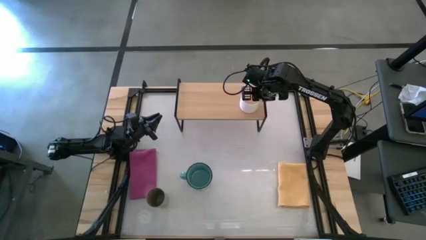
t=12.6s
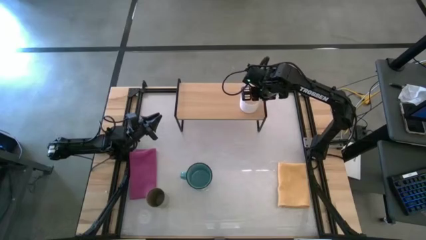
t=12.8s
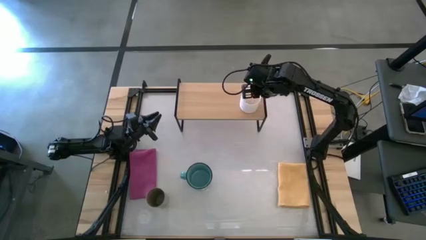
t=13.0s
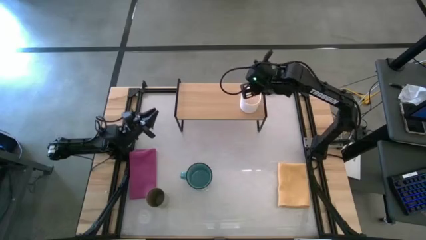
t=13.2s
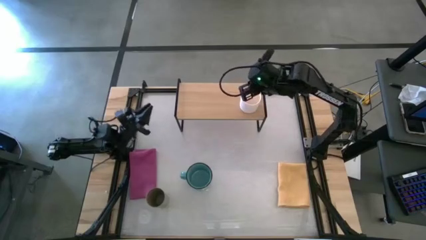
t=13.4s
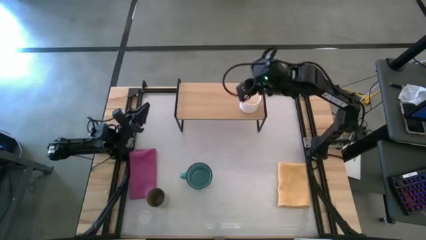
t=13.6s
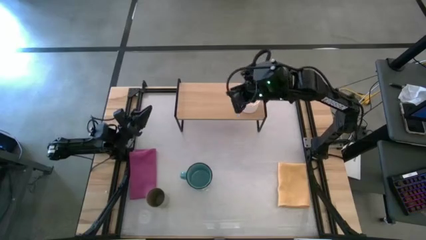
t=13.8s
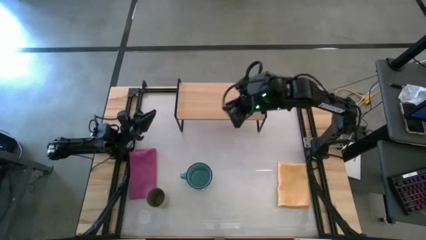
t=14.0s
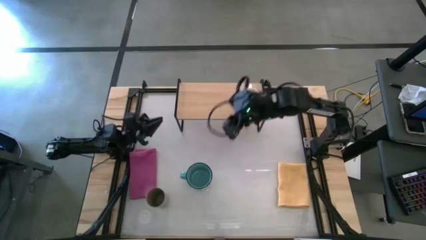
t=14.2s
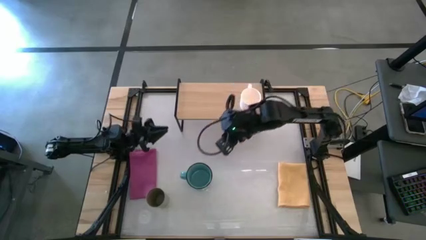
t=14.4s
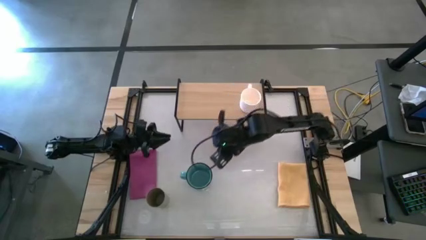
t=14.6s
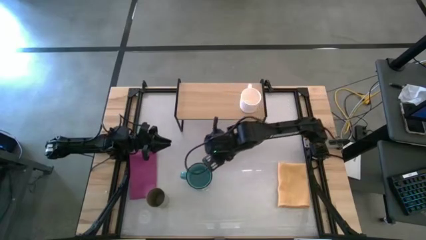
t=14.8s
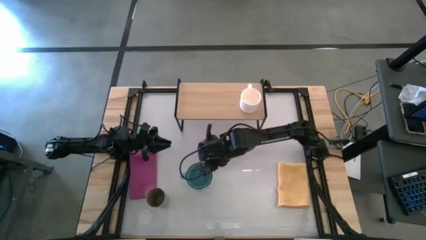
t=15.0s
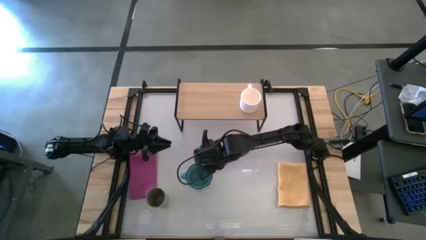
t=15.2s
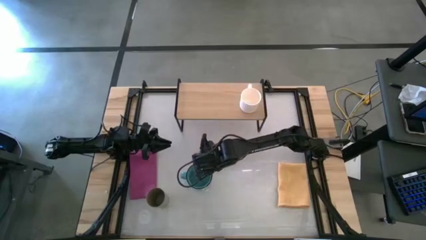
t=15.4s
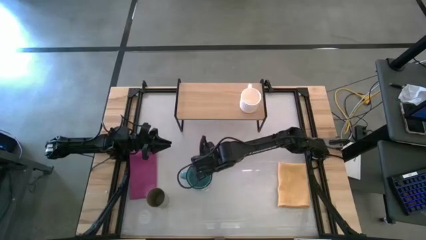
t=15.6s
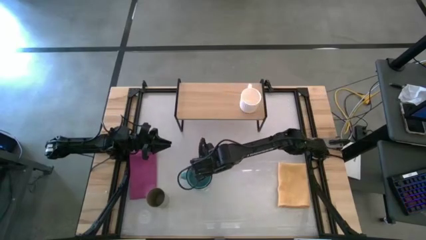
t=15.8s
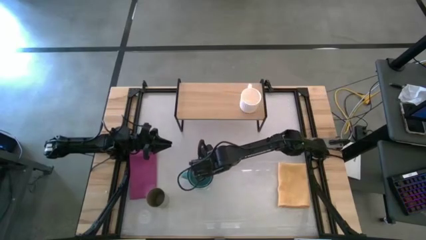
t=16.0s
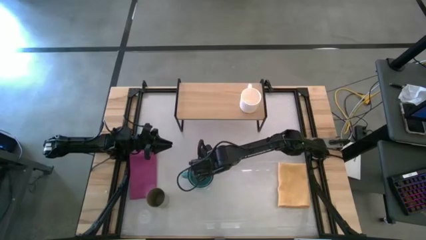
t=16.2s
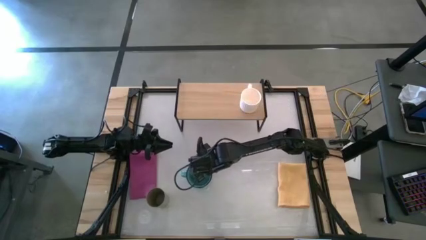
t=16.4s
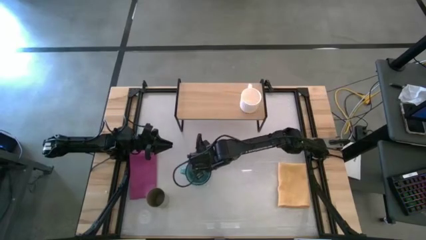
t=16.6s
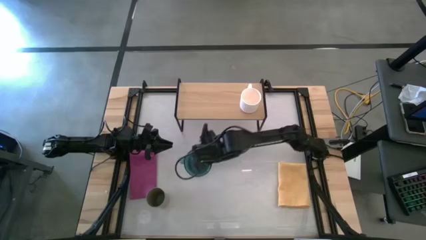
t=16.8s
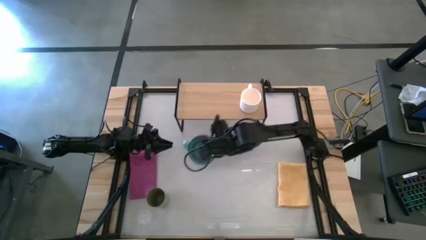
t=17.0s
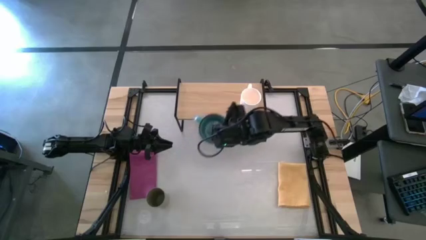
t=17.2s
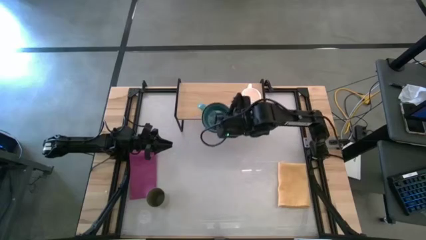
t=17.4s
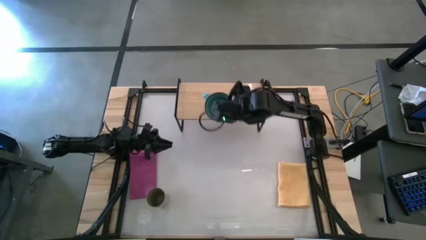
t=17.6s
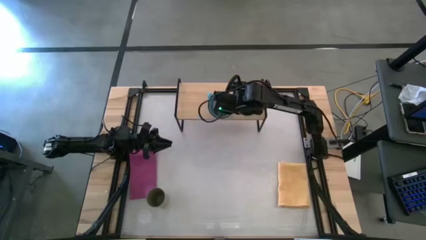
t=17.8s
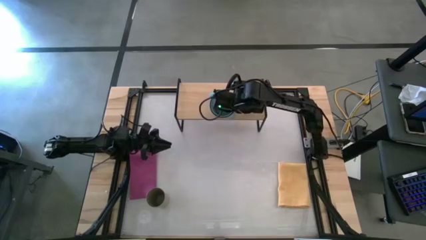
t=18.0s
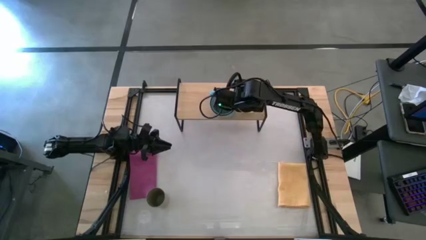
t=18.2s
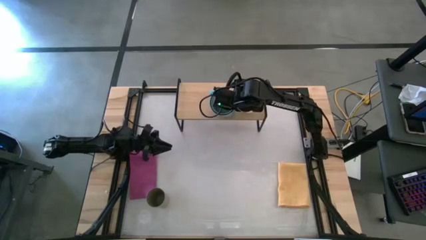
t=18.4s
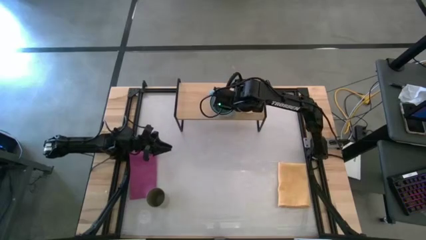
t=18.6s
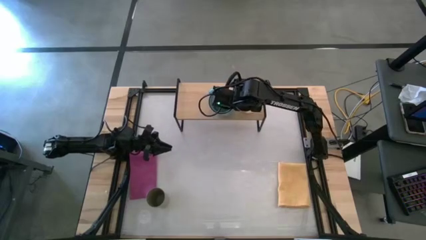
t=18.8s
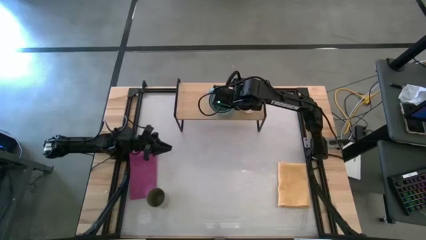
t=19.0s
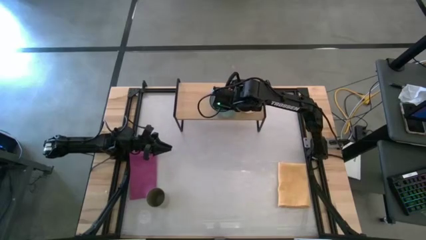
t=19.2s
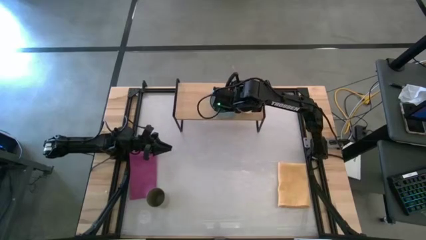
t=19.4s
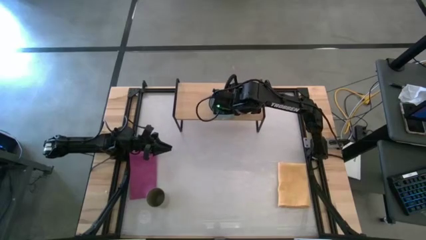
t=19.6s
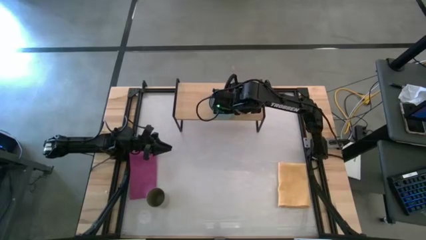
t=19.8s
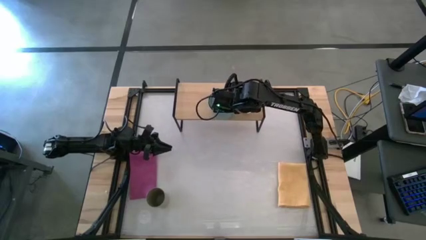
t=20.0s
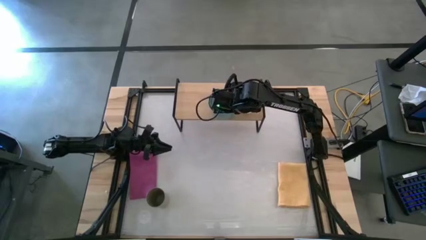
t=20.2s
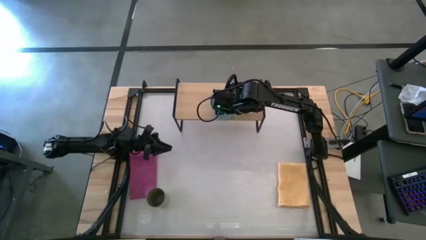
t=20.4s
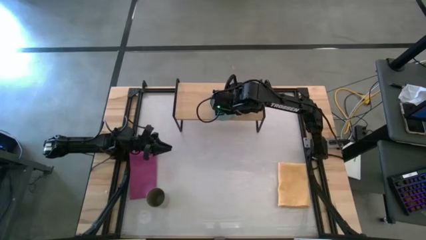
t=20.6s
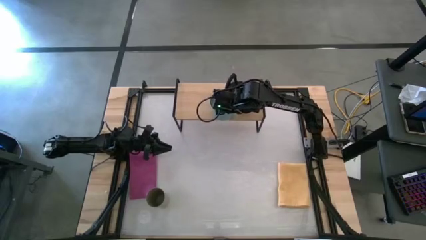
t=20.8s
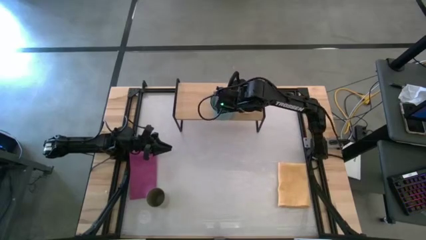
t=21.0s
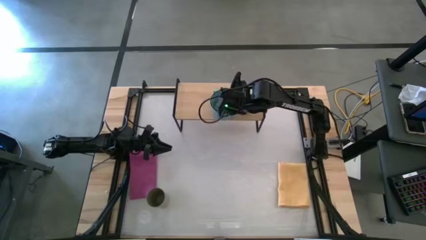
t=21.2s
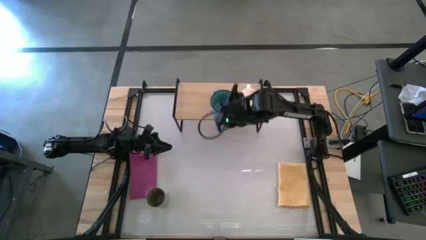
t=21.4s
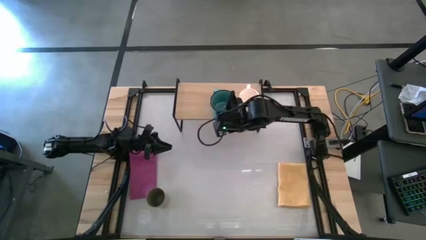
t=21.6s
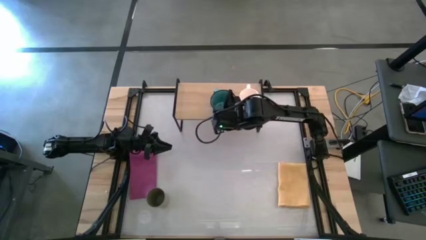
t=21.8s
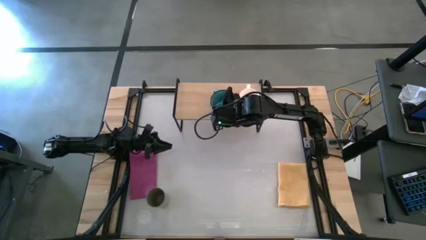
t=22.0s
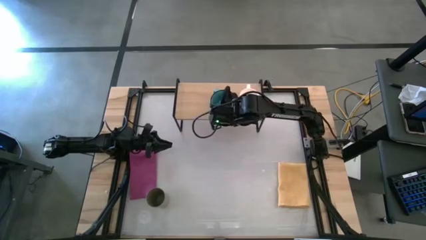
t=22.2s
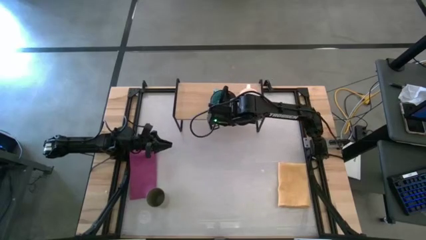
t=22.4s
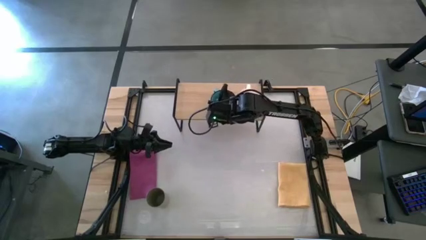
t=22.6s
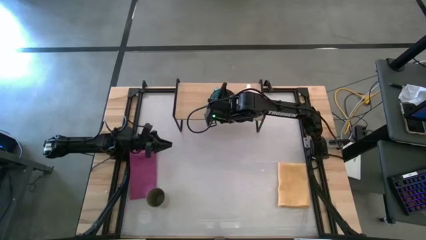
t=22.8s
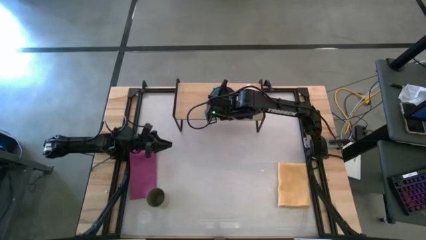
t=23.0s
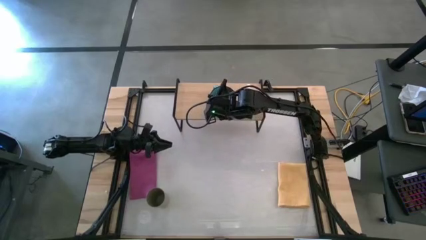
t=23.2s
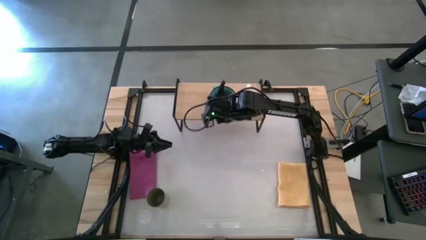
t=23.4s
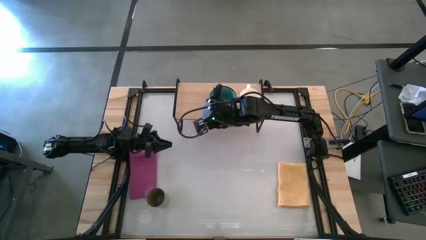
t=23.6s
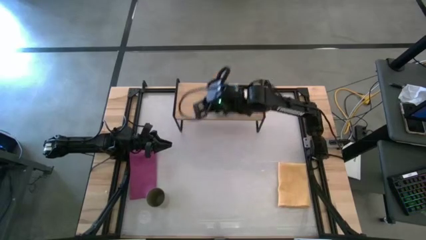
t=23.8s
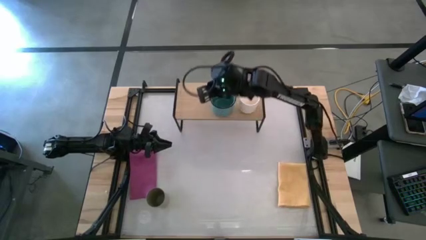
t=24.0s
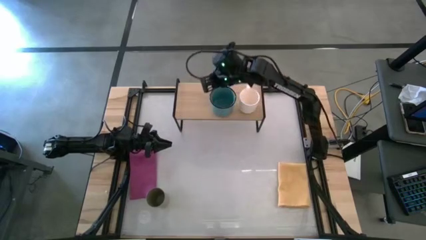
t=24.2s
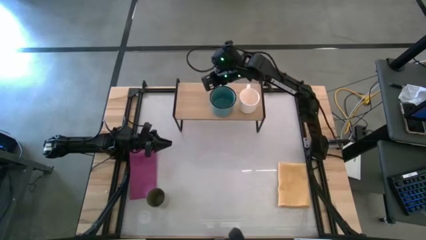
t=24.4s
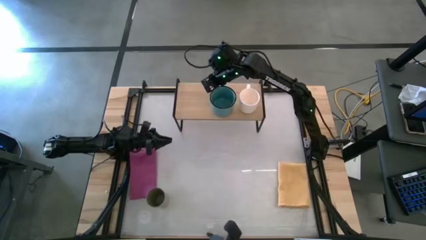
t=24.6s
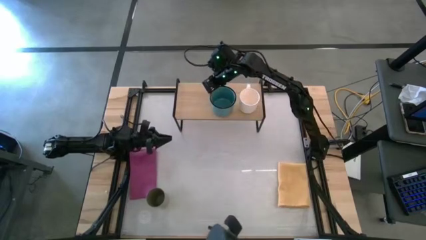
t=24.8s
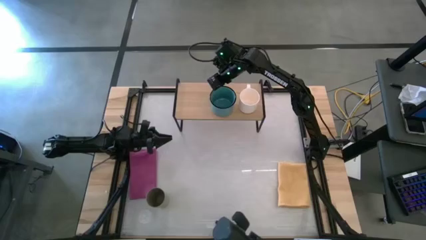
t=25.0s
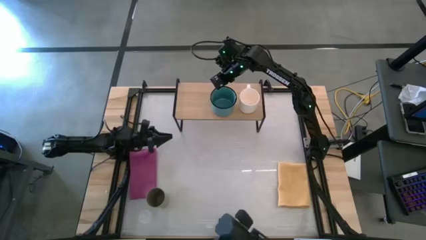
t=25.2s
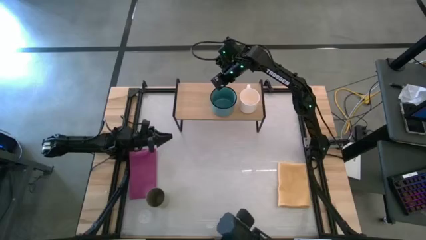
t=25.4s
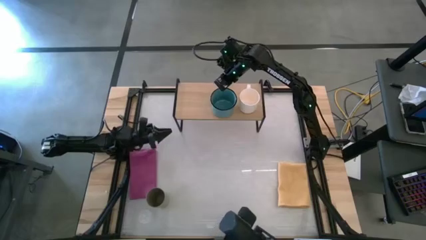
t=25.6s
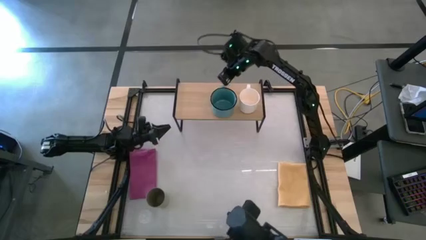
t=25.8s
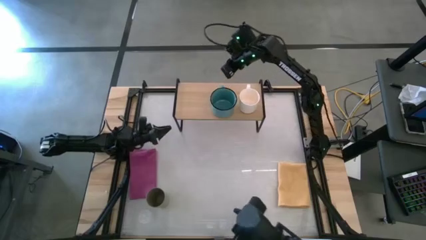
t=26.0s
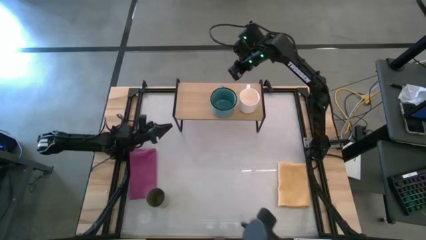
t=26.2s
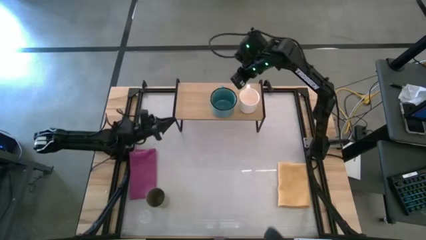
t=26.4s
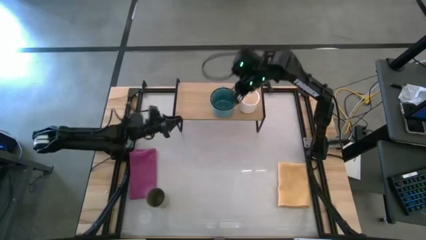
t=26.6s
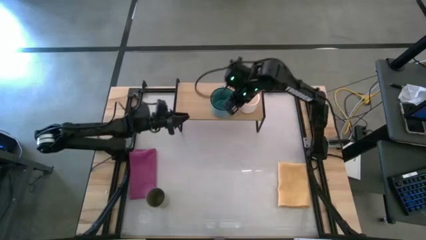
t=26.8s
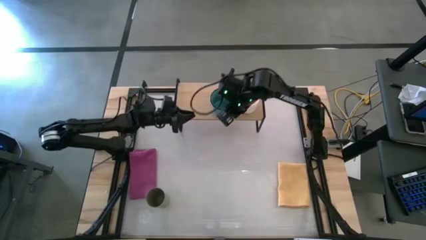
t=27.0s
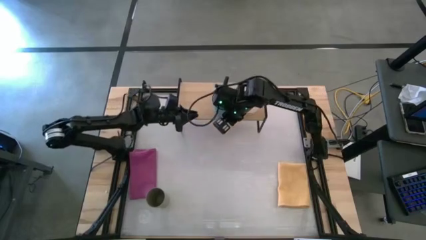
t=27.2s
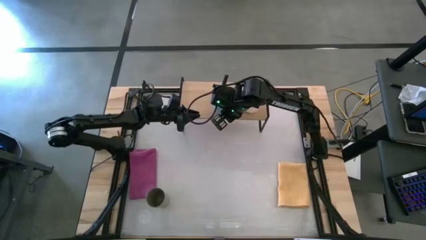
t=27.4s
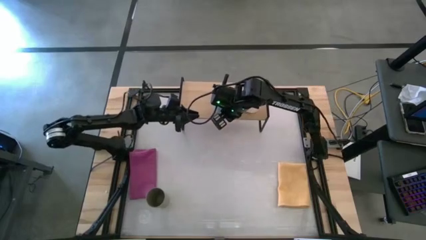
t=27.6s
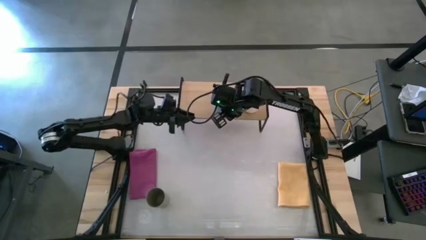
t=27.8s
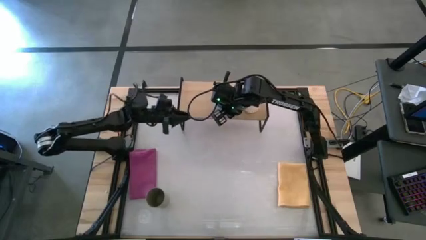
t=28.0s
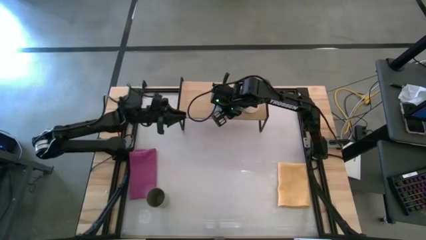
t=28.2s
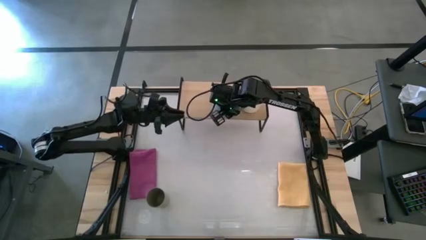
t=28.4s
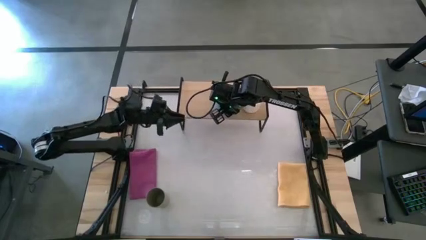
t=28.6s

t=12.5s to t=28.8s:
Task: Stack small to large cups/mugs on shelf
Put the blue mug on the shelf
